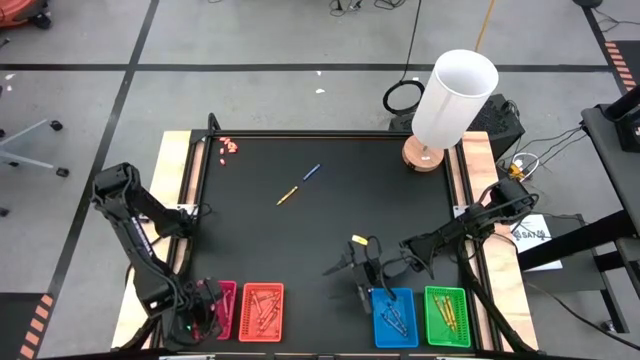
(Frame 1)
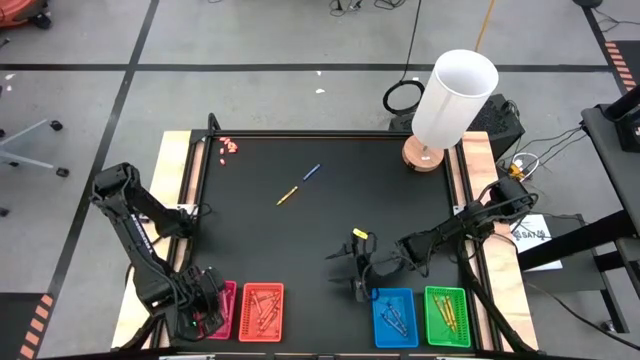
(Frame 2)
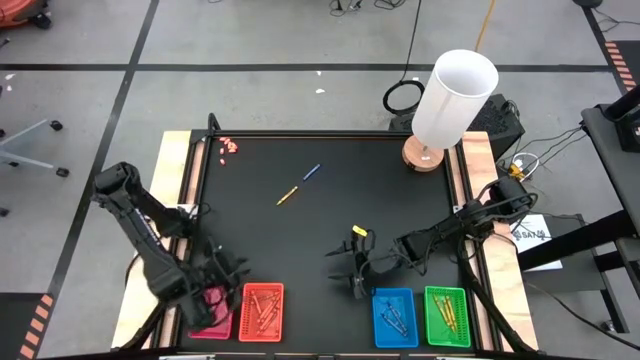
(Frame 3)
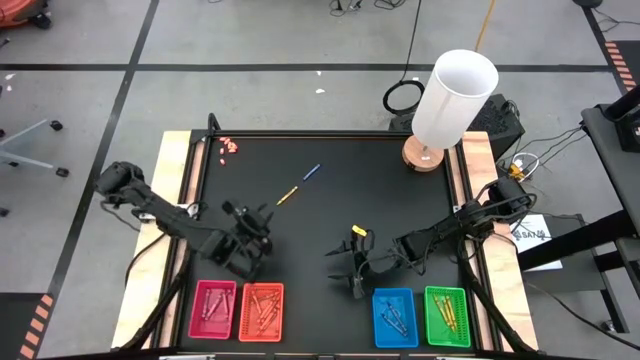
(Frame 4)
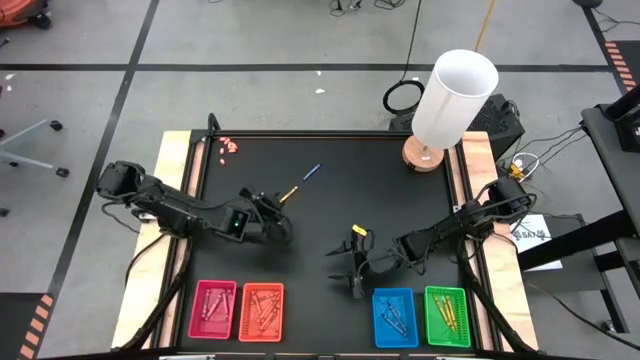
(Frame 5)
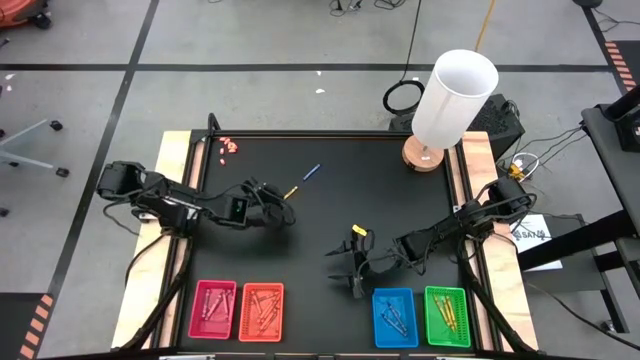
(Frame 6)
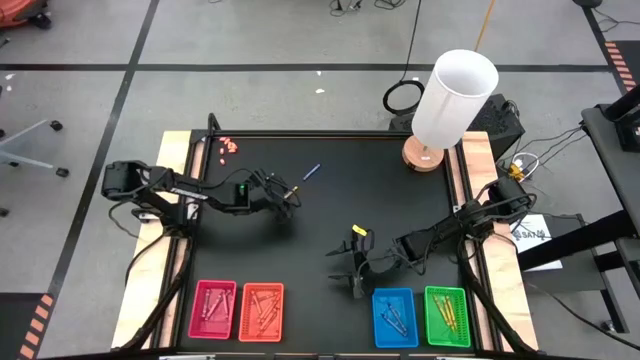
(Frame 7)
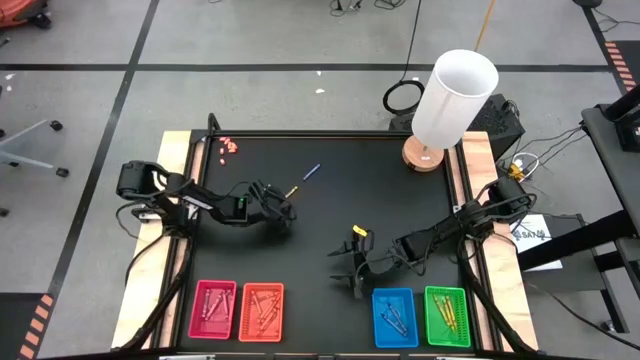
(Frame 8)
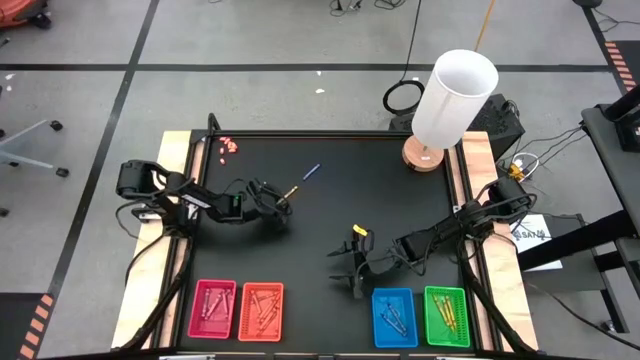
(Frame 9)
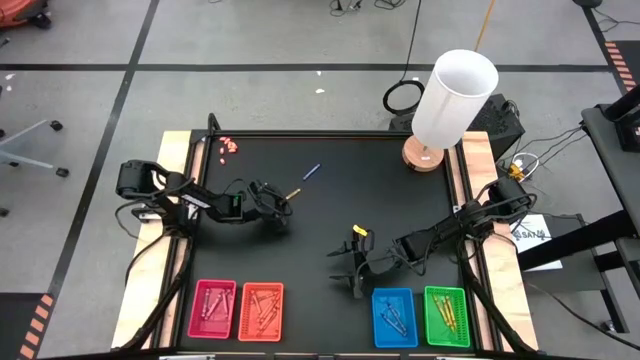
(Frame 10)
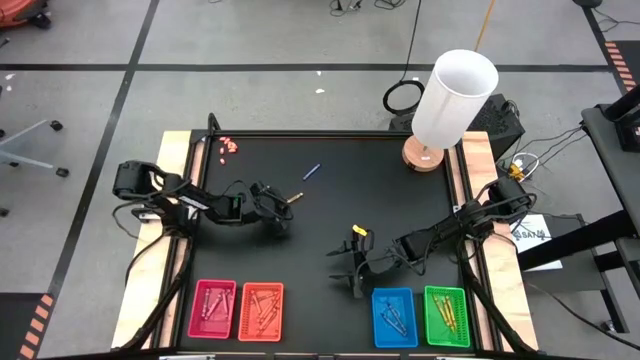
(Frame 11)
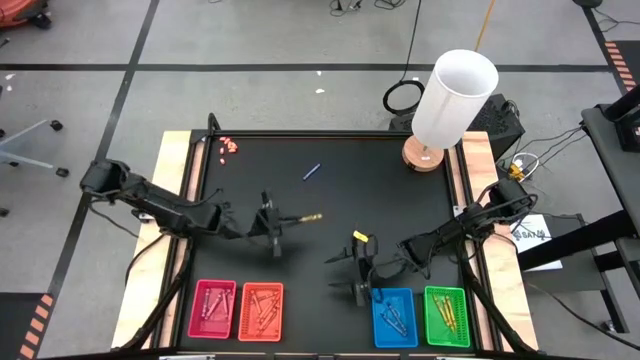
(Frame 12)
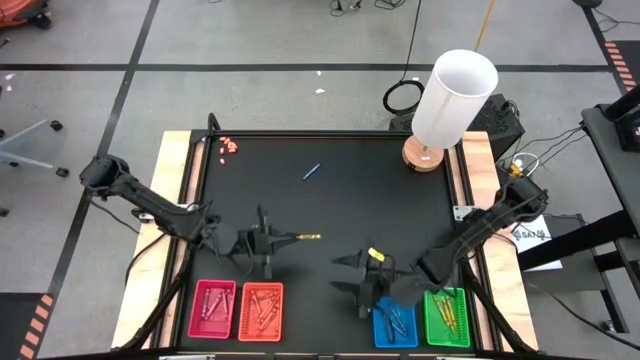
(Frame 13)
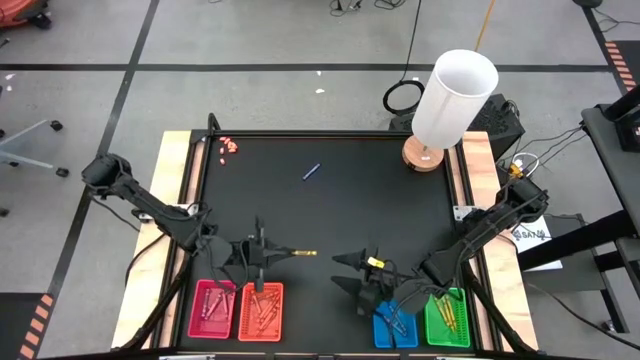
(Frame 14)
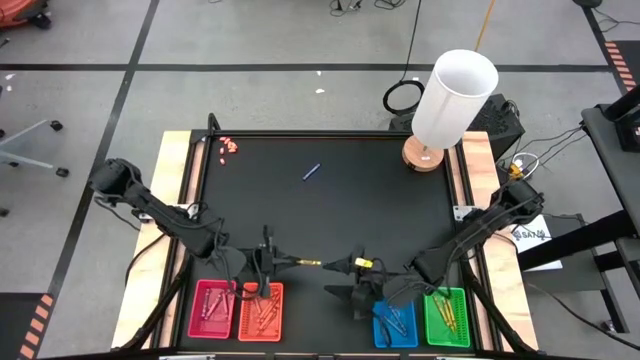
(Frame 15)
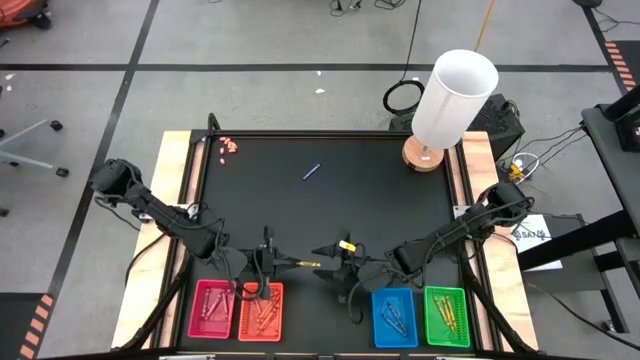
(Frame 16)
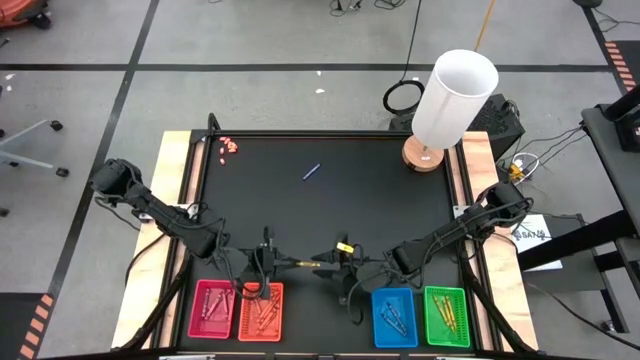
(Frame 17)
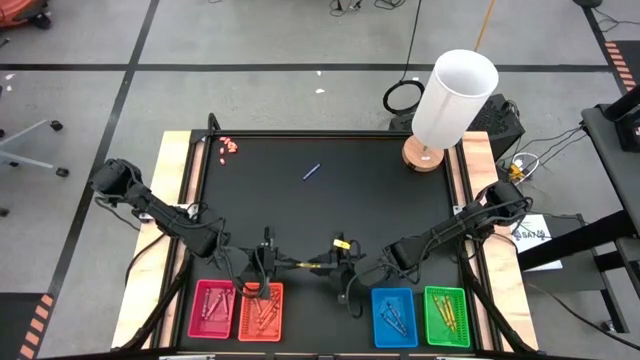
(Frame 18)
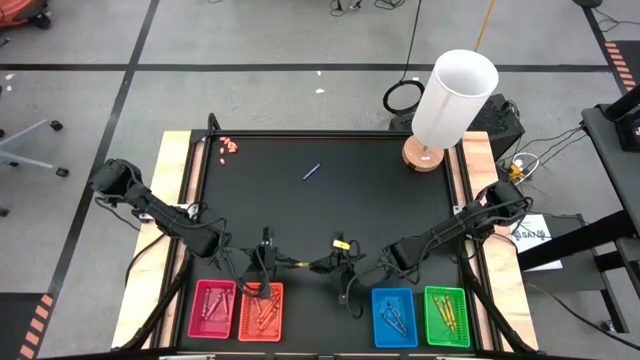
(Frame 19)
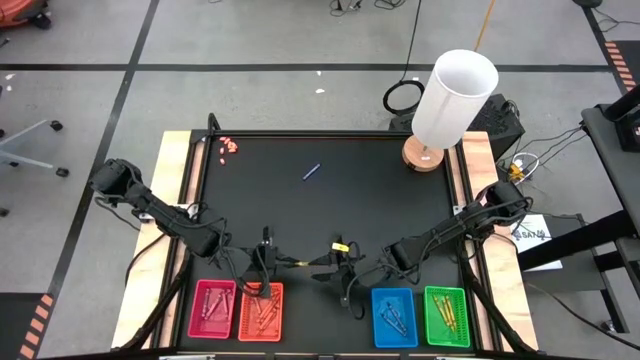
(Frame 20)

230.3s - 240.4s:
Task: Sort crayons
Put the green crayon into the green bin

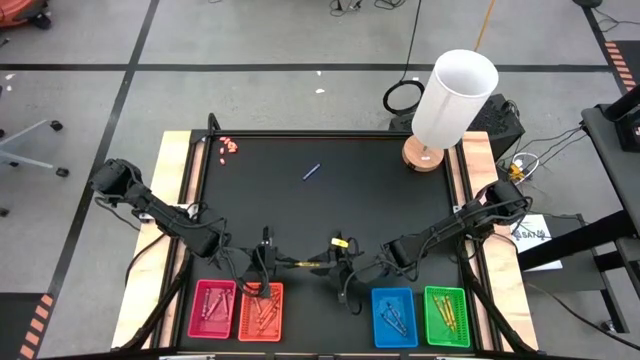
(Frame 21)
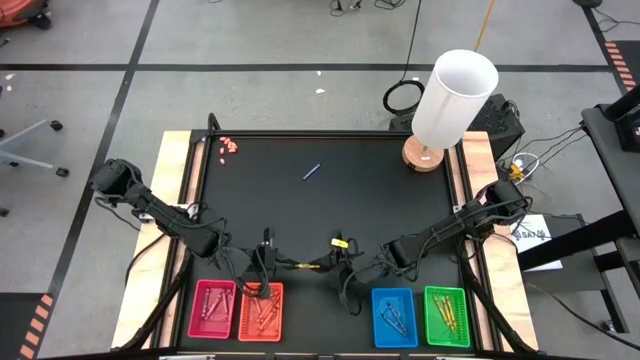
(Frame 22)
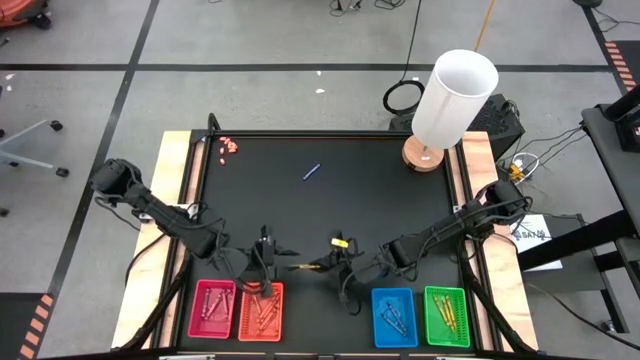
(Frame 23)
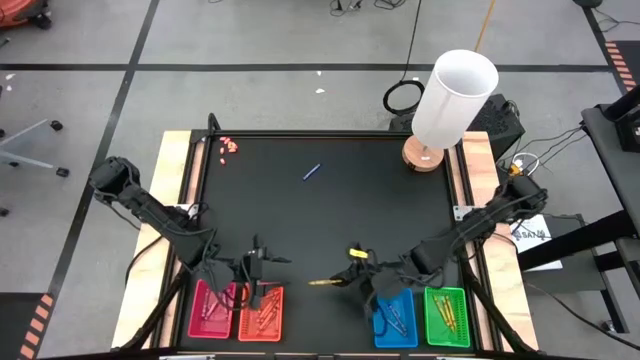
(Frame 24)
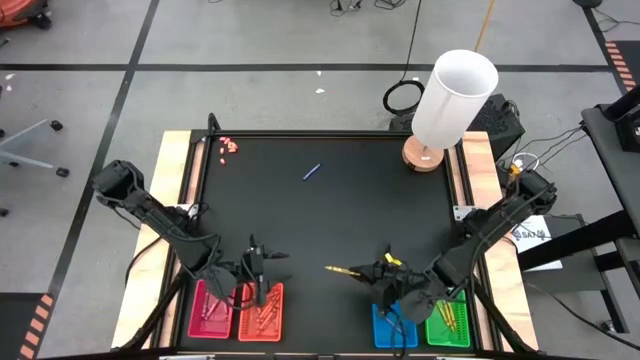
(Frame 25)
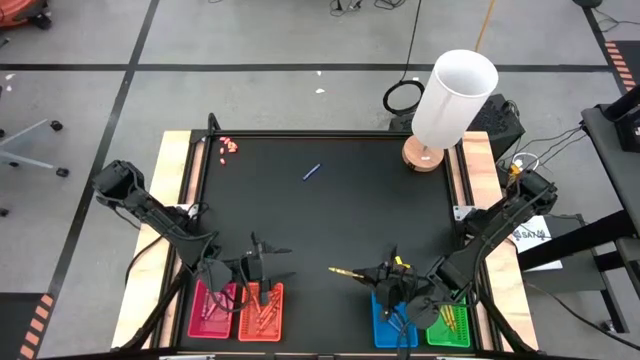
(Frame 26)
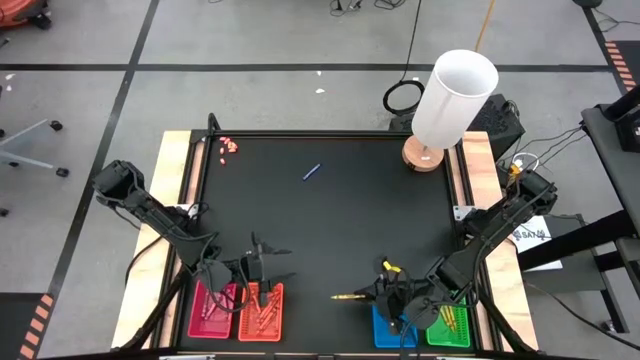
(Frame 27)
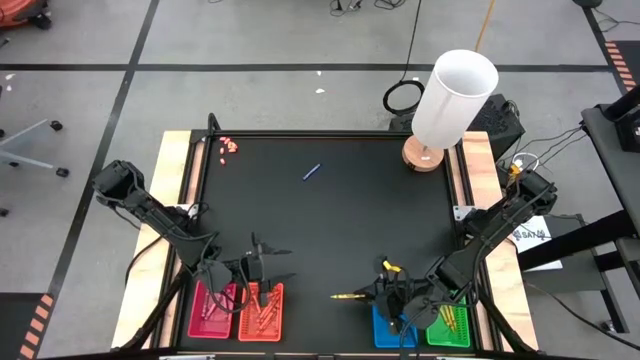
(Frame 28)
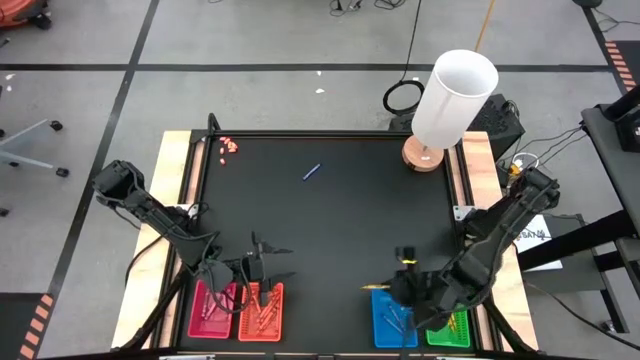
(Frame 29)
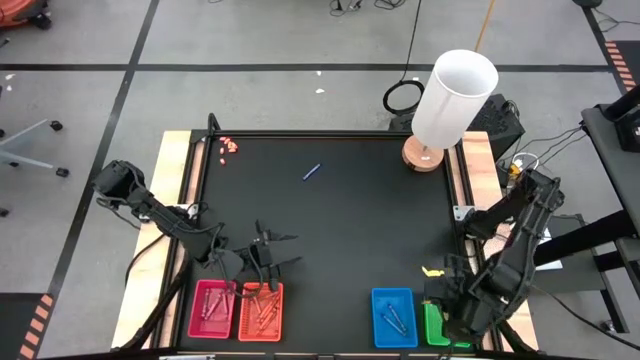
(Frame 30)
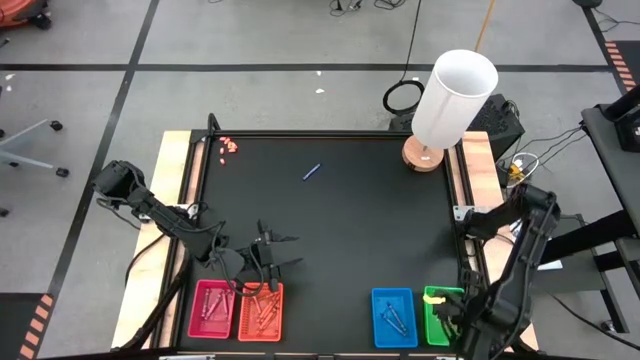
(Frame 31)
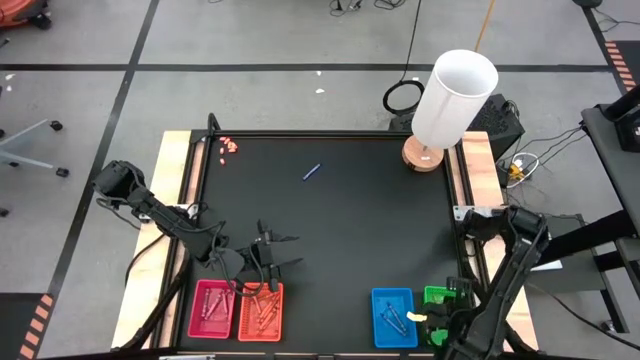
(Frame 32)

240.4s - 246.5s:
Put the green crayon into the green bin

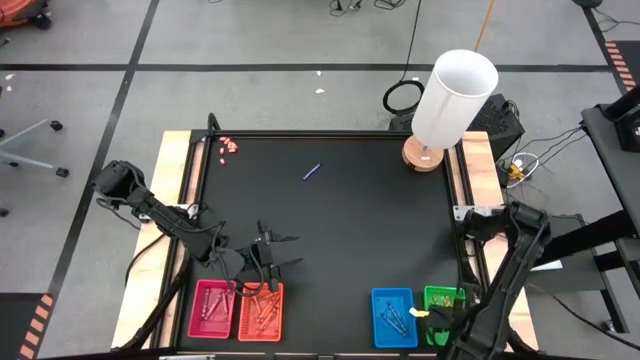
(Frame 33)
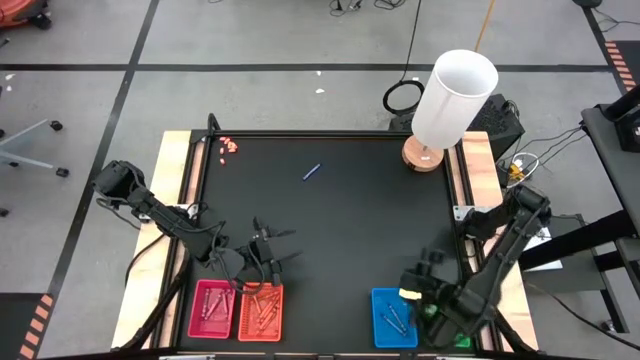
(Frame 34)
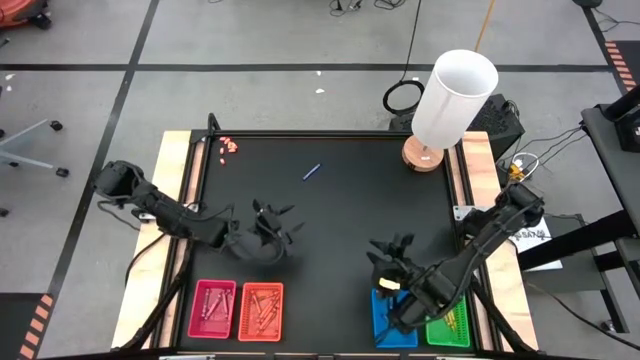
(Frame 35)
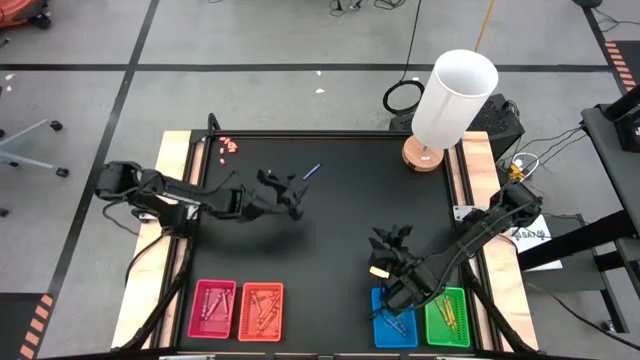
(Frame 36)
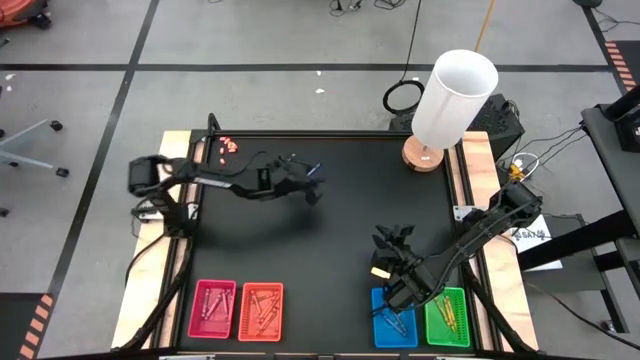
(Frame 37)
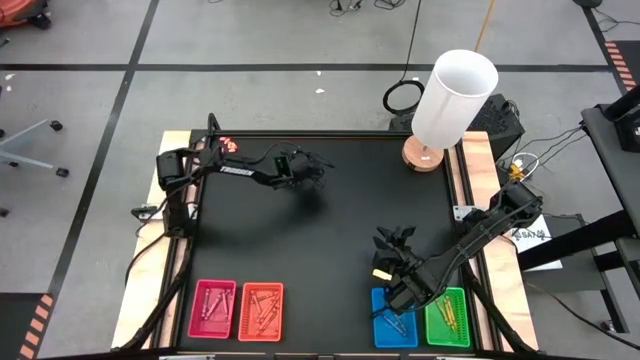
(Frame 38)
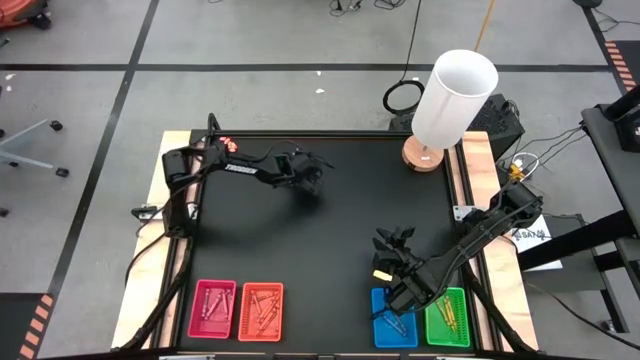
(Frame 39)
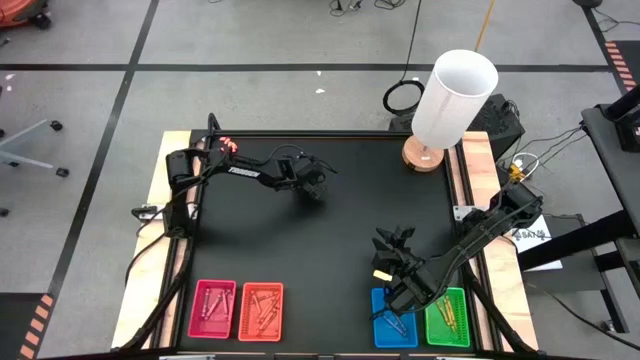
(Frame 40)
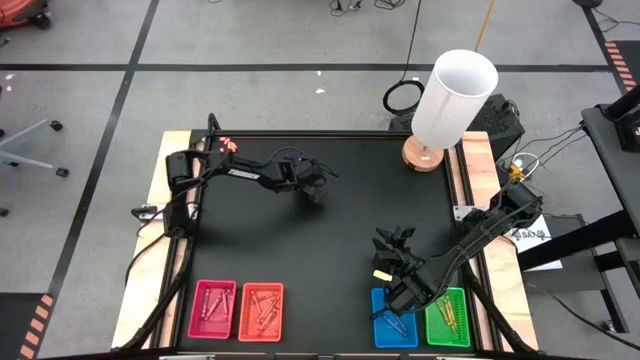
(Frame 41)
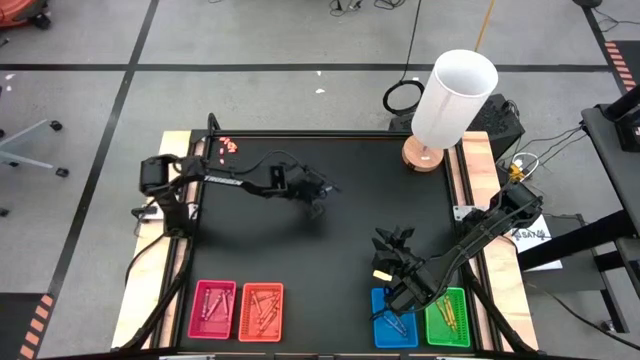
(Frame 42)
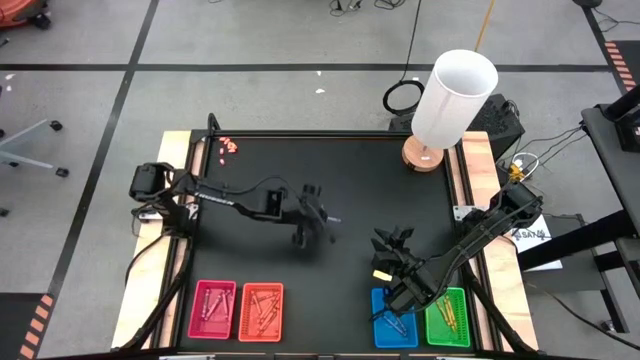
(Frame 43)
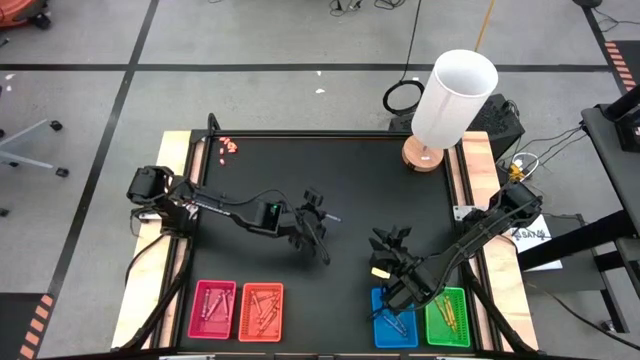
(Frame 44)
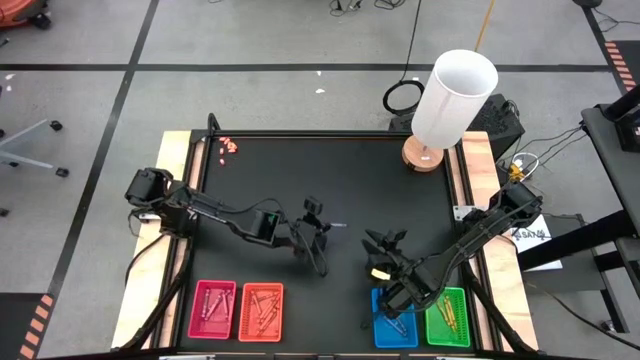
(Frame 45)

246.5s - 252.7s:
Put the blue crayon into the blue bin
